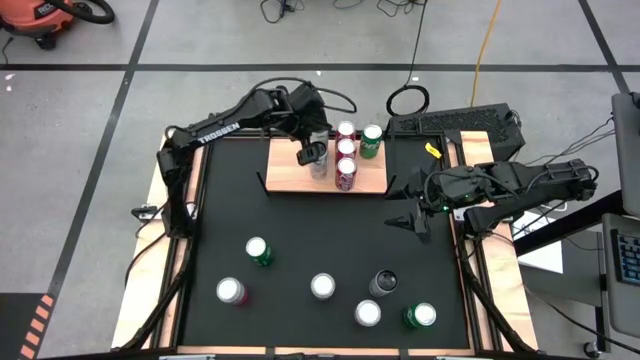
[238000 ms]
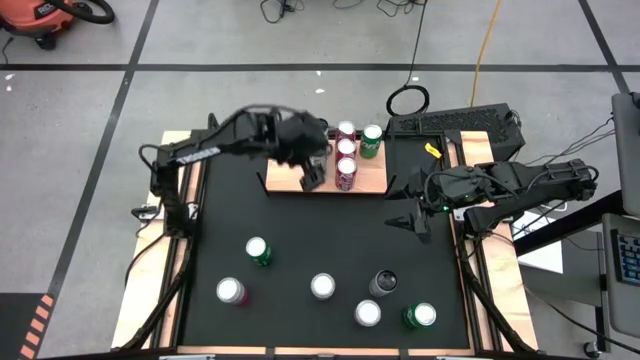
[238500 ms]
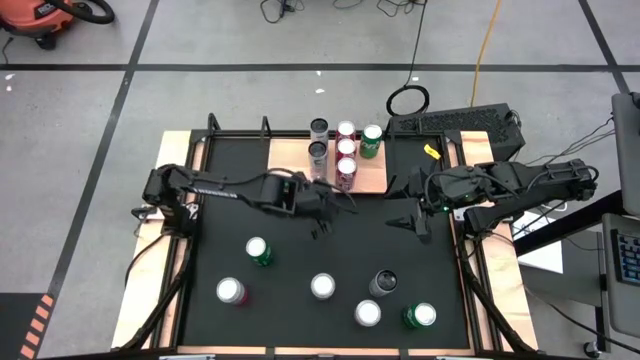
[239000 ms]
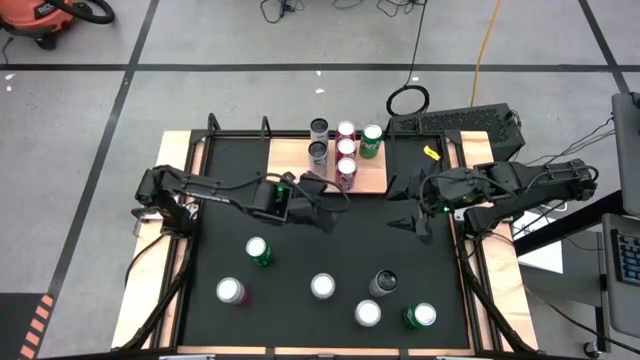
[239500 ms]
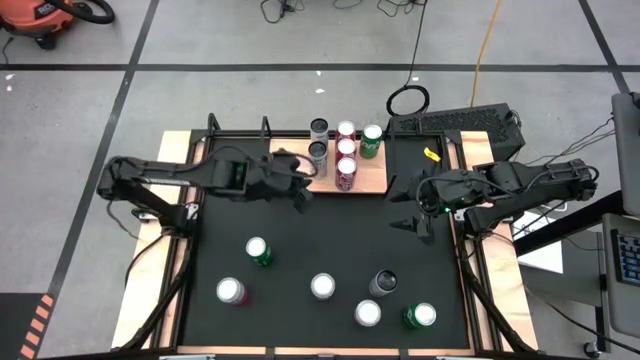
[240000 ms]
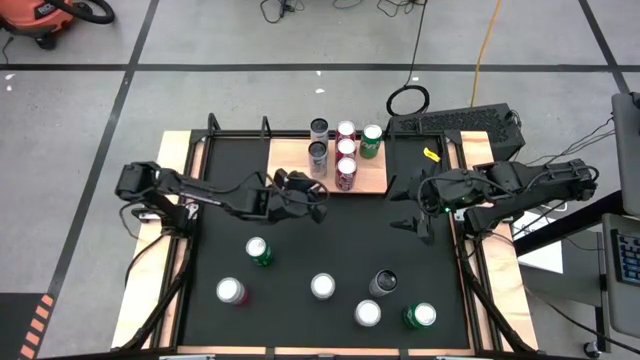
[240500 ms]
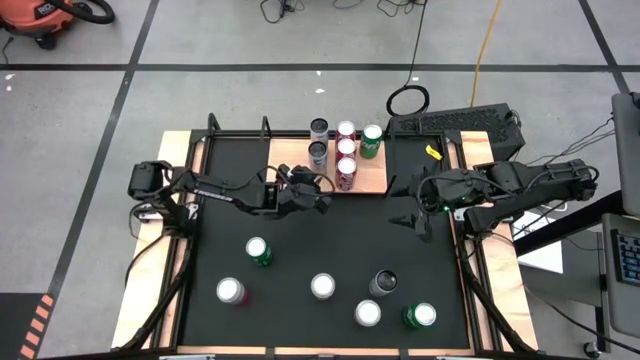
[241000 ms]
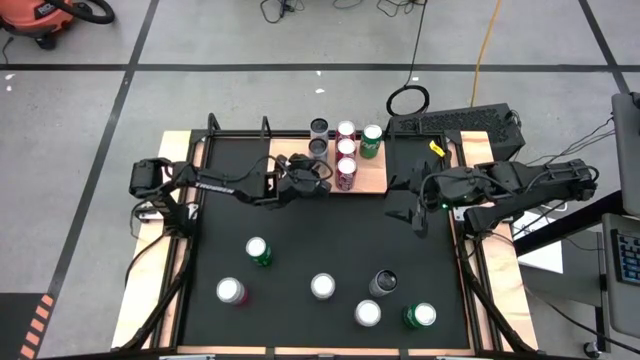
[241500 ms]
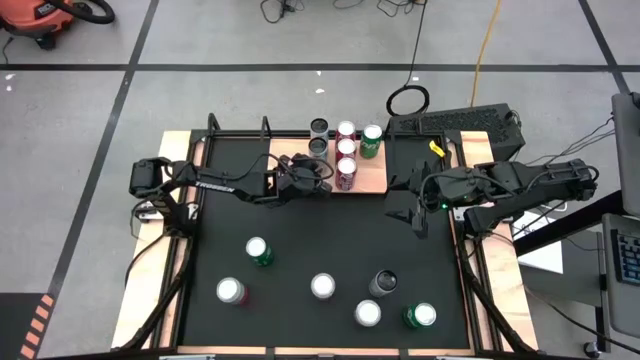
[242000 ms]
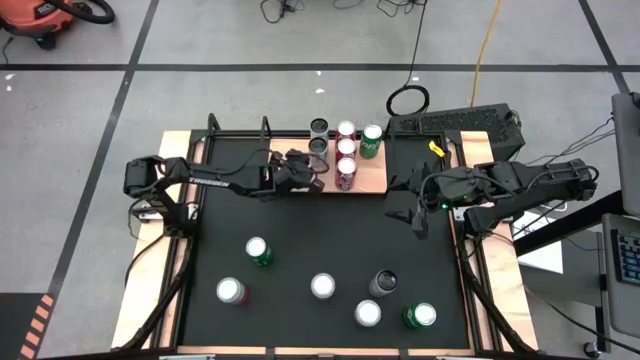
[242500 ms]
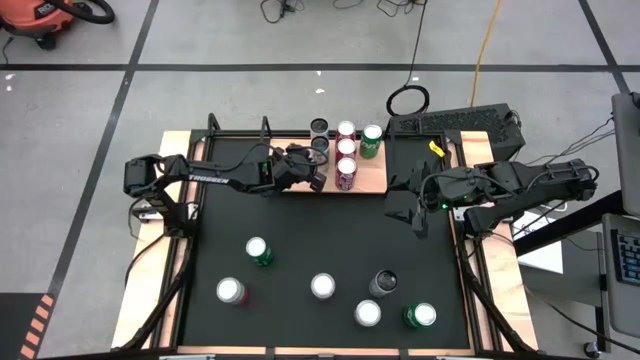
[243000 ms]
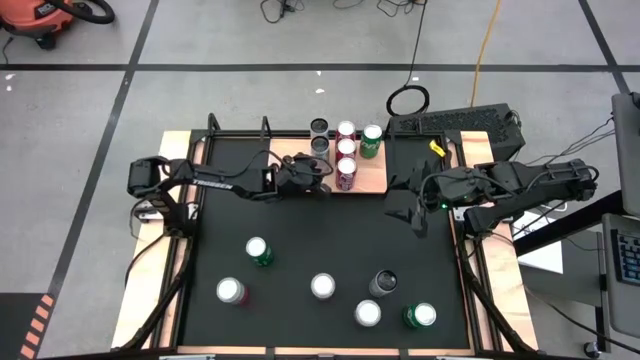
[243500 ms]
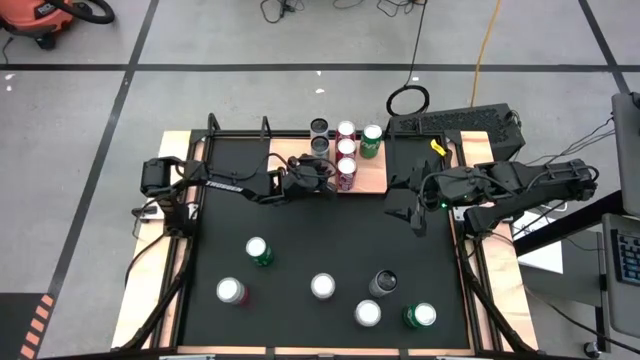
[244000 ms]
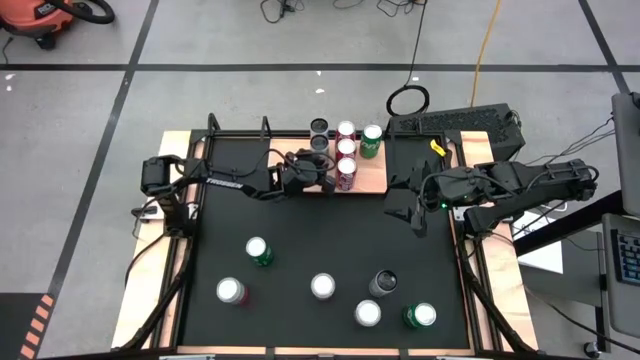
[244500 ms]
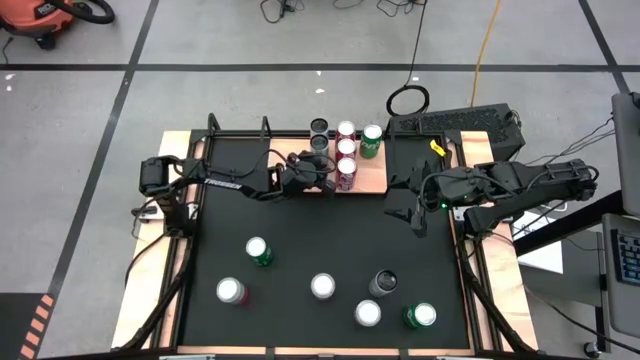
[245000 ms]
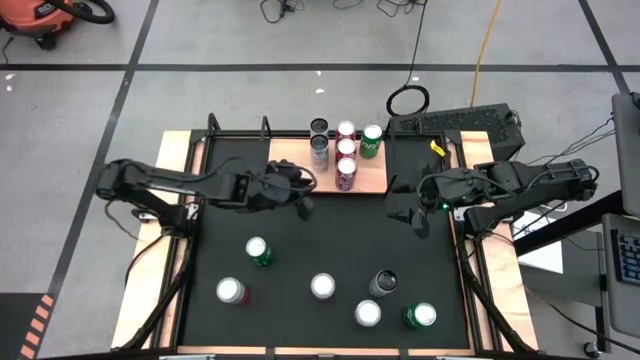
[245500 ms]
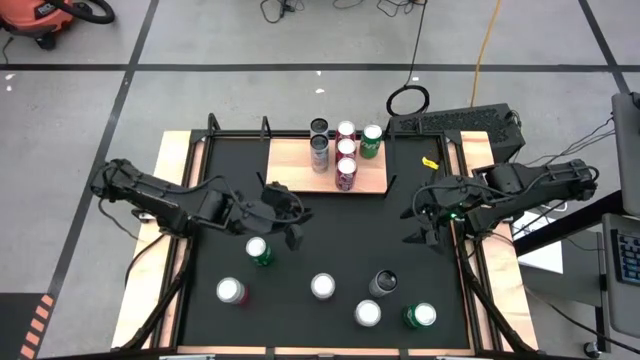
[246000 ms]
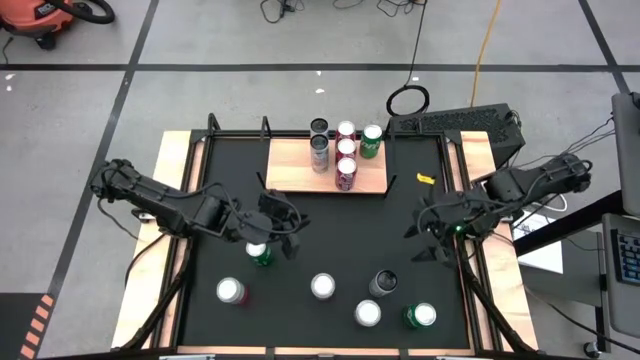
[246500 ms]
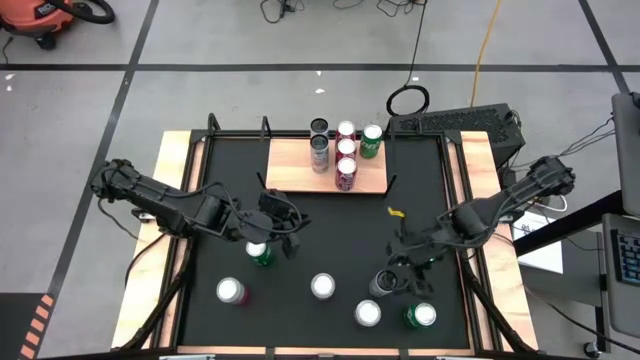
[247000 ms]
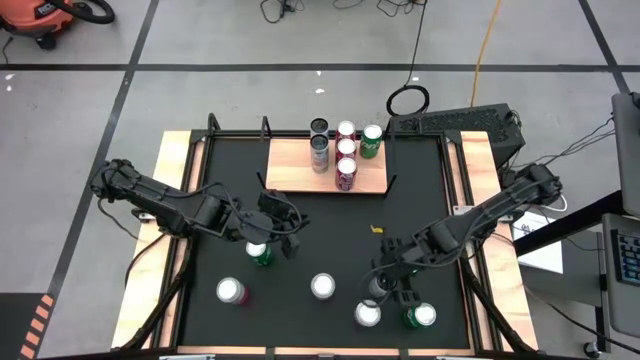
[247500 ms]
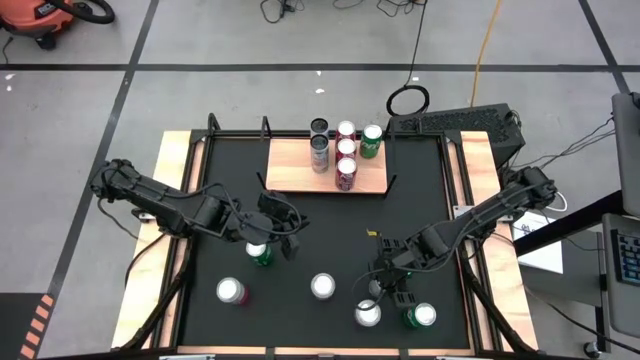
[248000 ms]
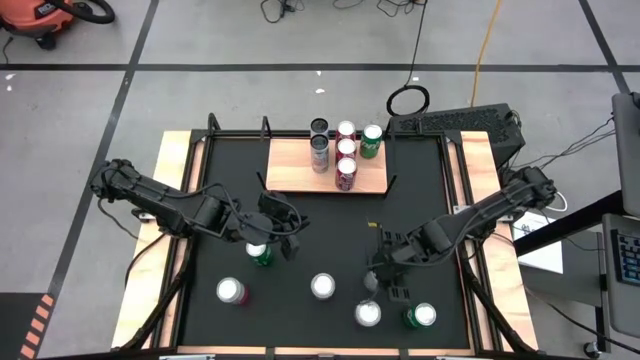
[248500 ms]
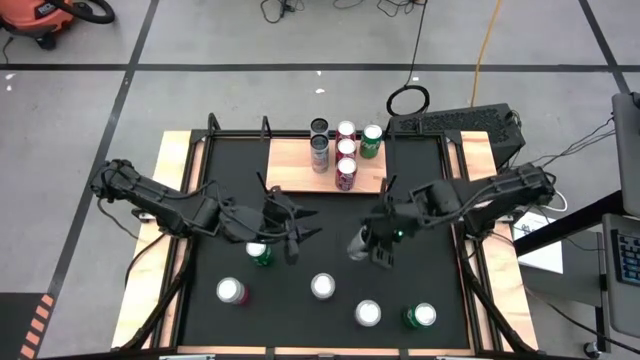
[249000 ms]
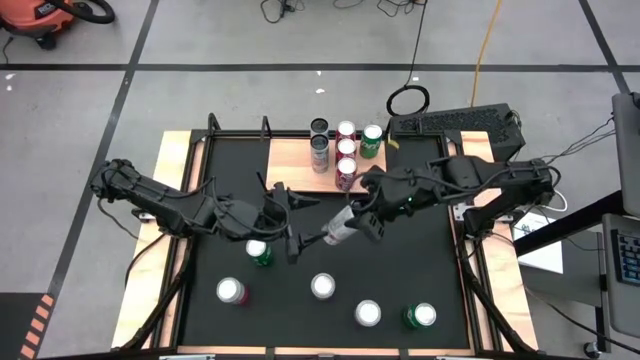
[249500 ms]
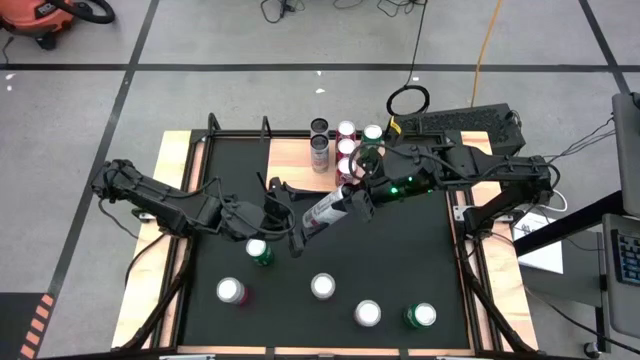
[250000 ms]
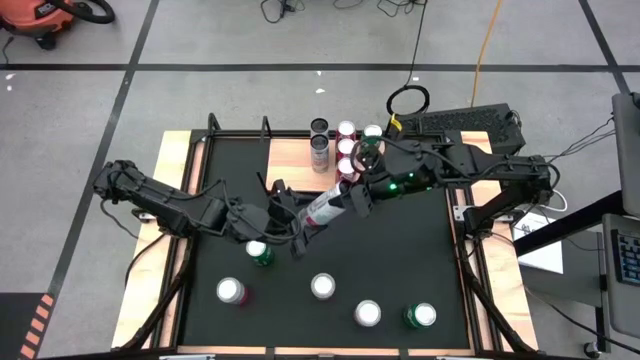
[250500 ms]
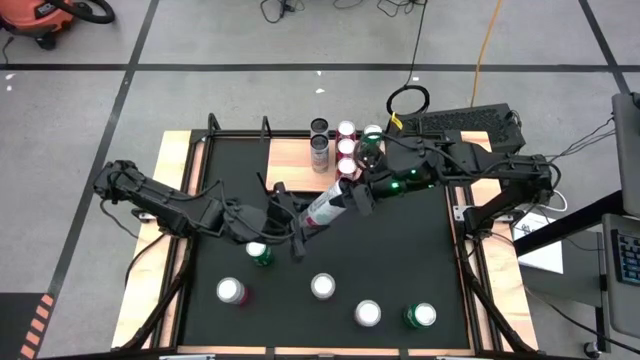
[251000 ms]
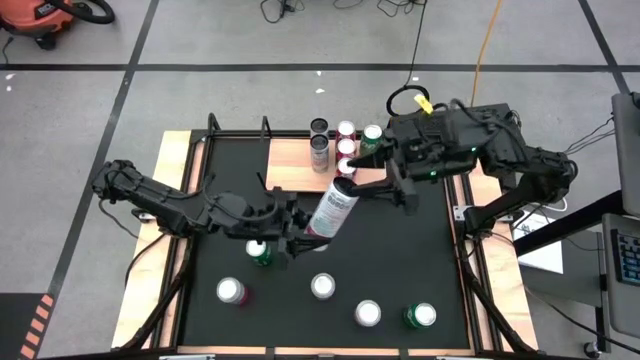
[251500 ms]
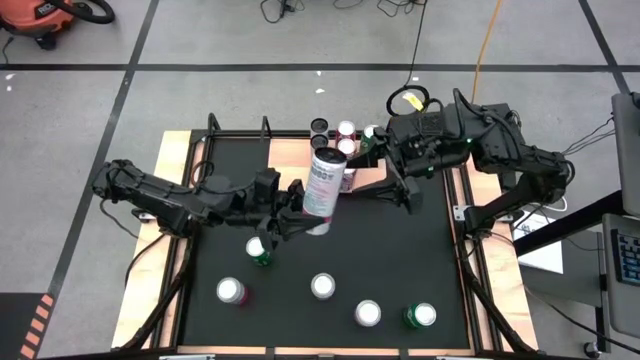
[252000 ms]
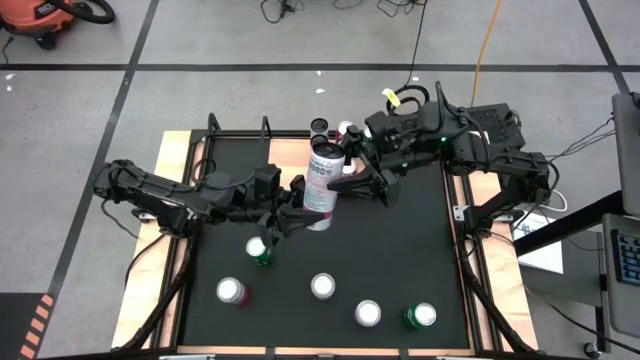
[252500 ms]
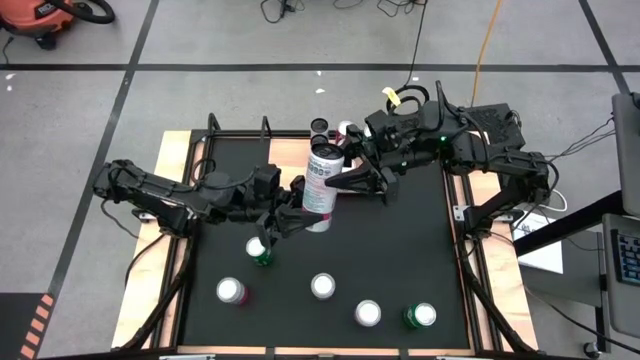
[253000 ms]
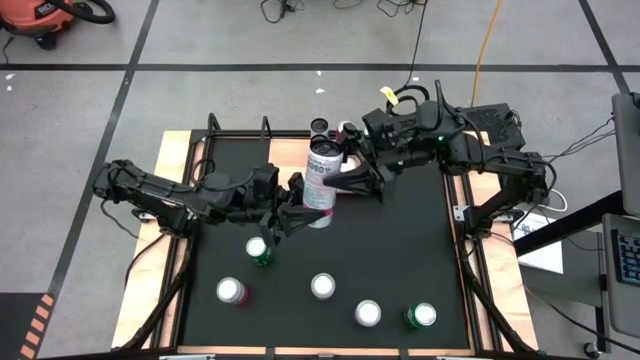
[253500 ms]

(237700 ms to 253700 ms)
Task: Place canned beverage on shelf
Put the white soda can on the shelf

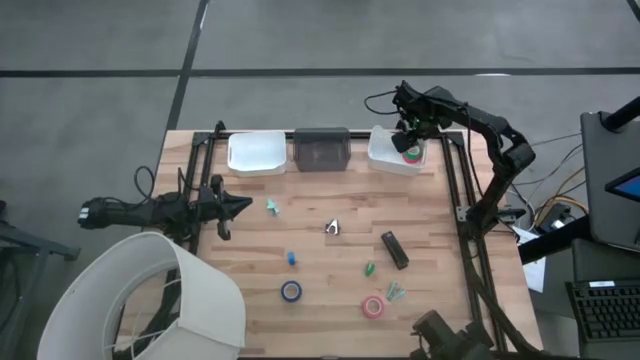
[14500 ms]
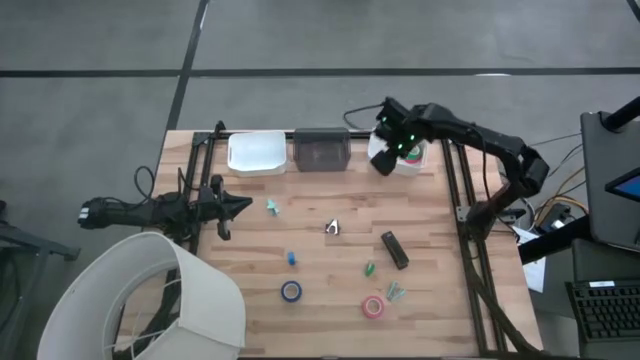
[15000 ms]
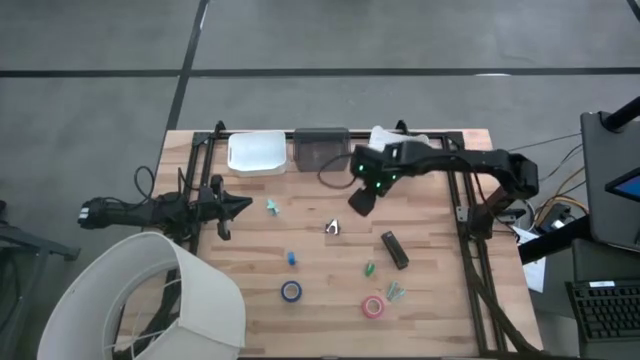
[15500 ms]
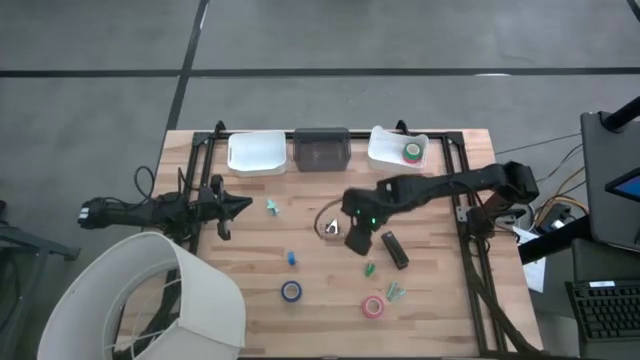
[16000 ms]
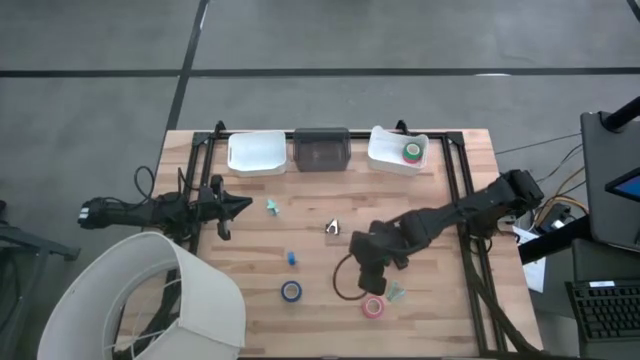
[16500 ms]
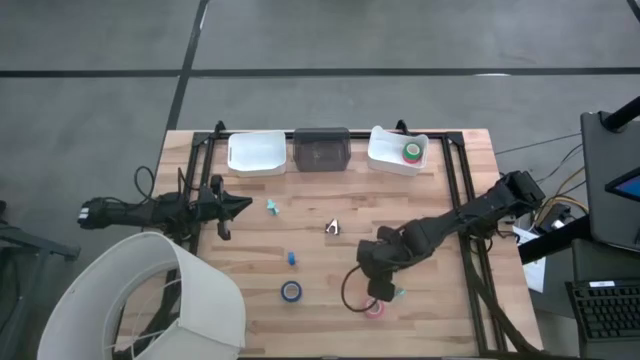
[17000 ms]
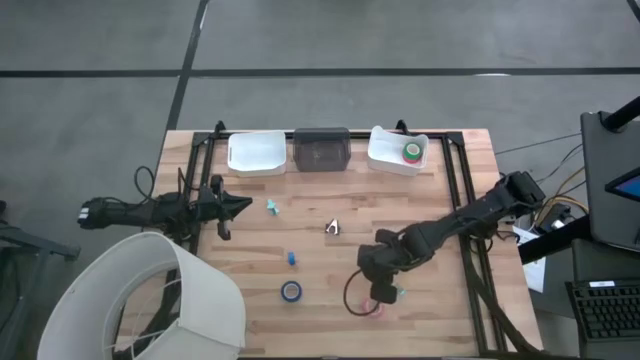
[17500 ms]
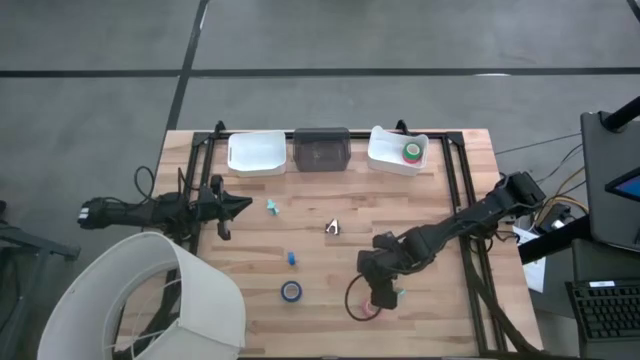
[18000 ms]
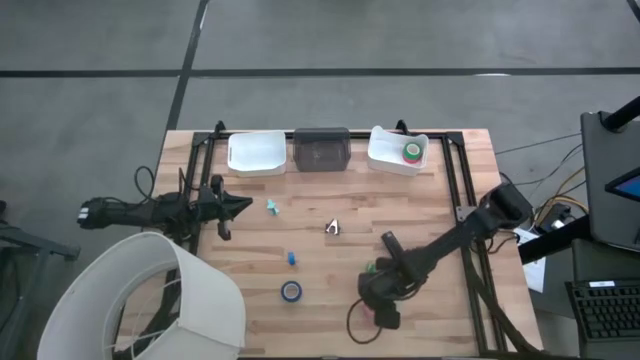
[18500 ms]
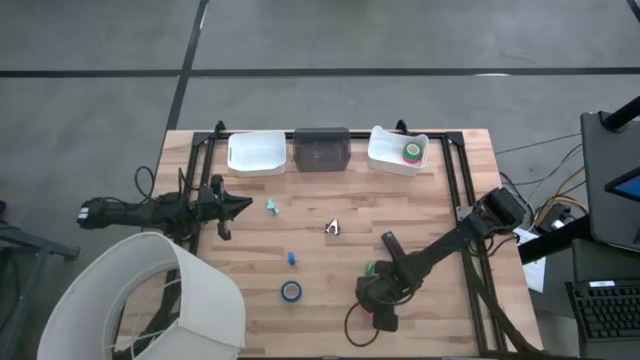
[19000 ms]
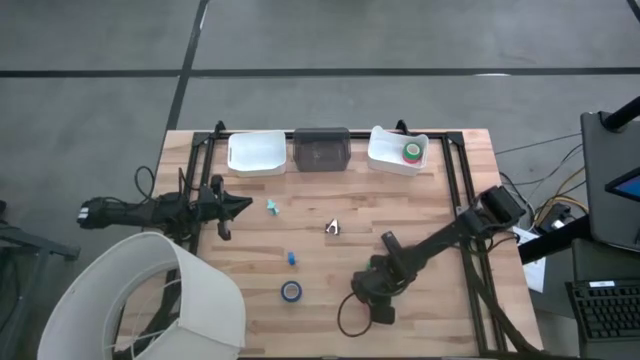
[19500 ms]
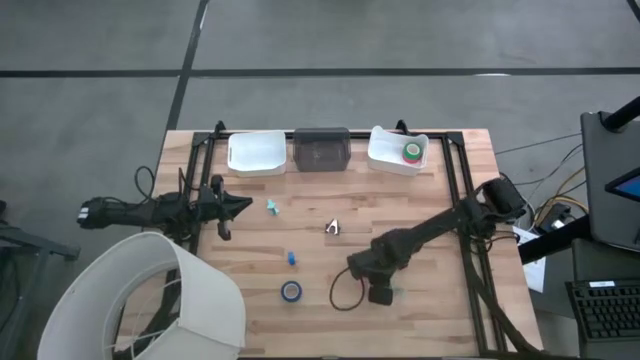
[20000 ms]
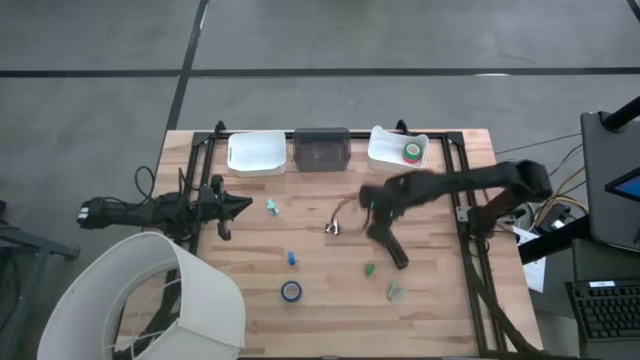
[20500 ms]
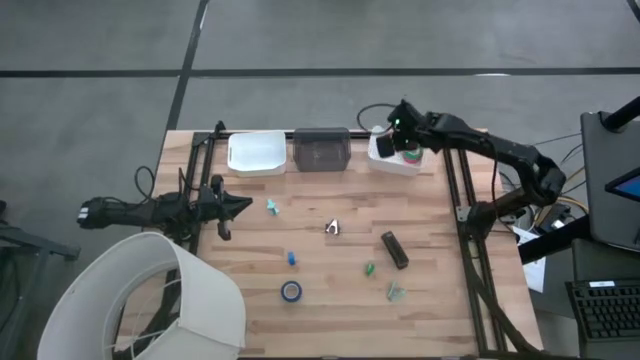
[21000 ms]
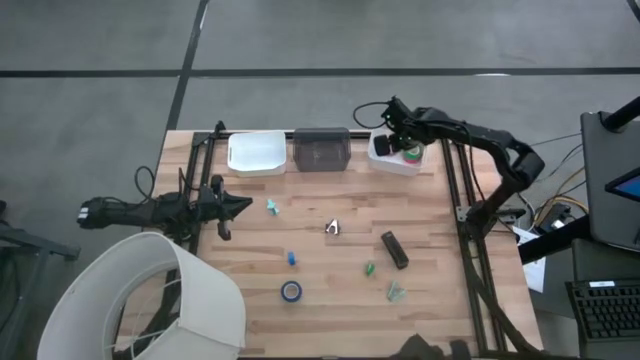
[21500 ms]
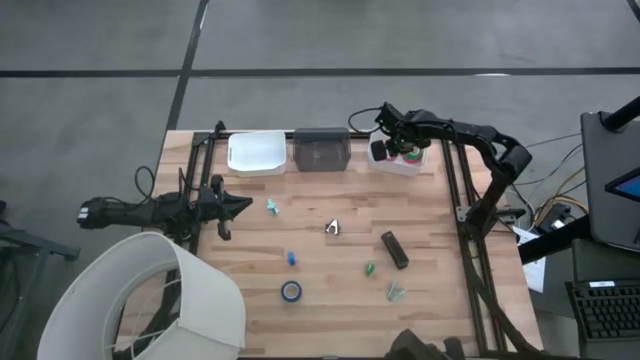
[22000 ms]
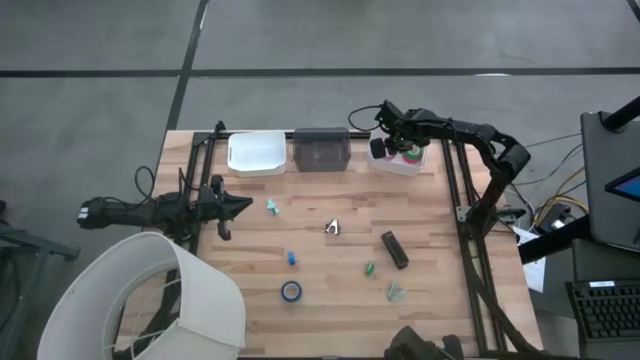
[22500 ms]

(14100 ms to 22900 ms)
Task: Pick and place Stapler, Stapler remover, tape
Put the pink tape into the right white bin
